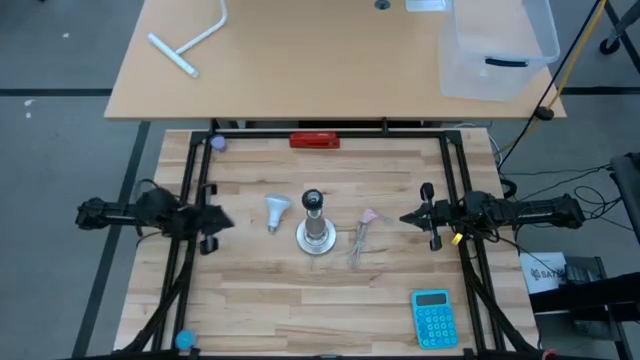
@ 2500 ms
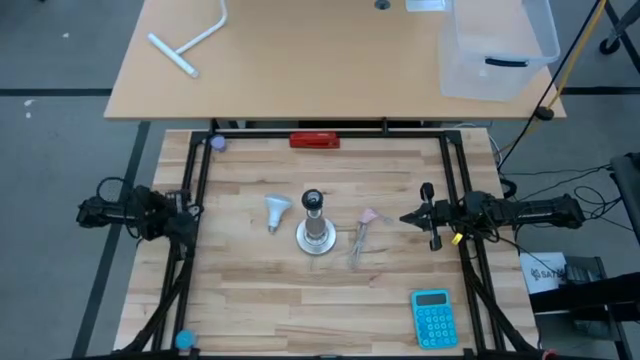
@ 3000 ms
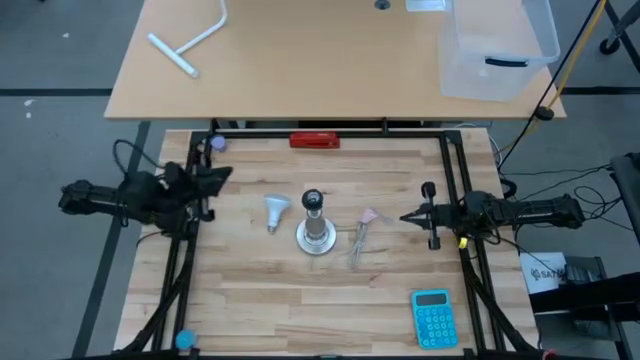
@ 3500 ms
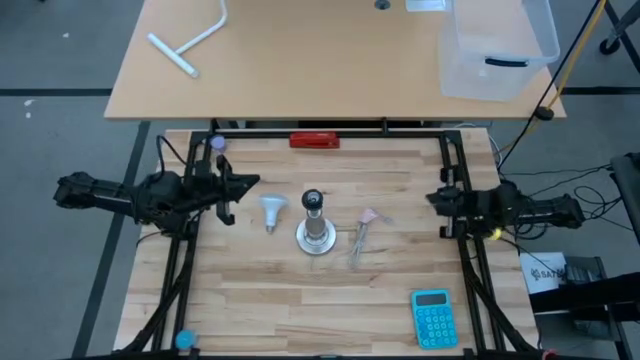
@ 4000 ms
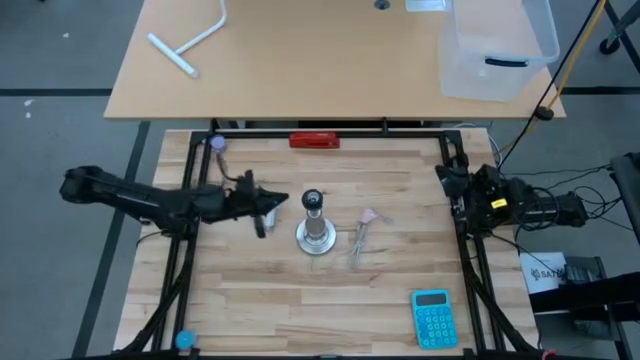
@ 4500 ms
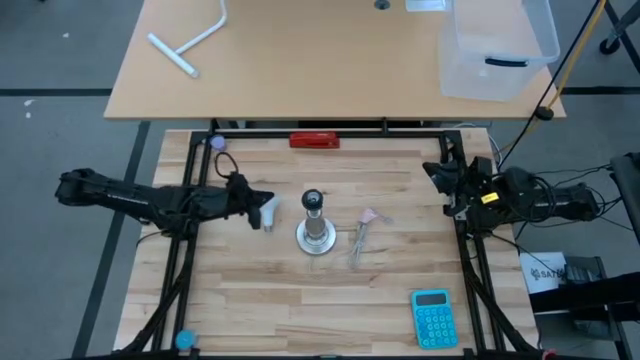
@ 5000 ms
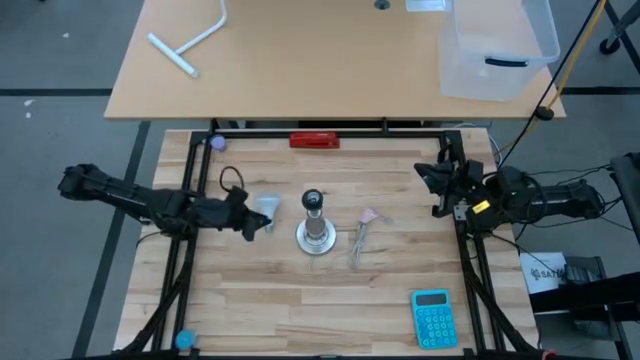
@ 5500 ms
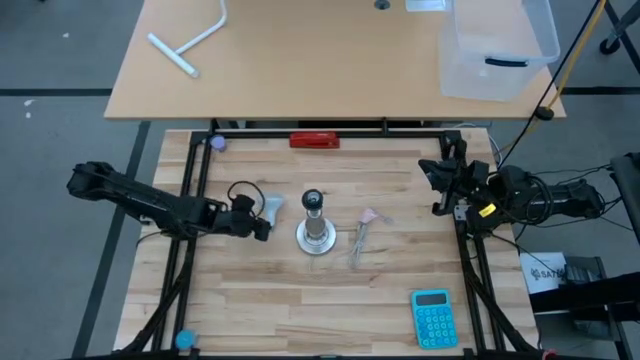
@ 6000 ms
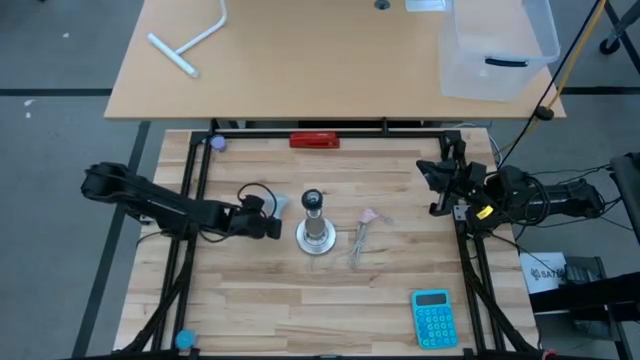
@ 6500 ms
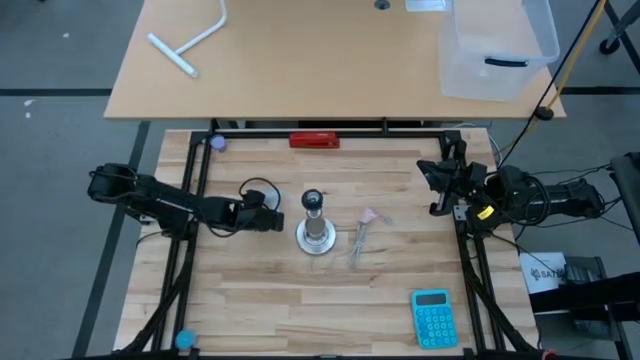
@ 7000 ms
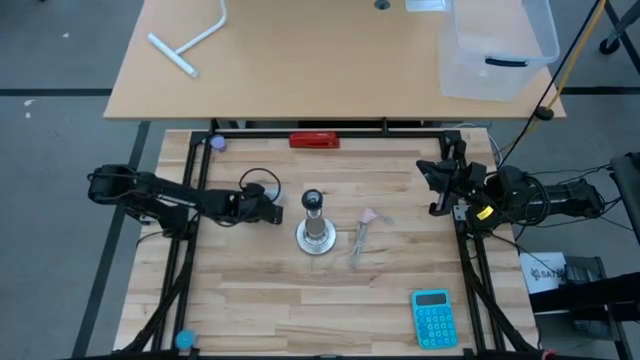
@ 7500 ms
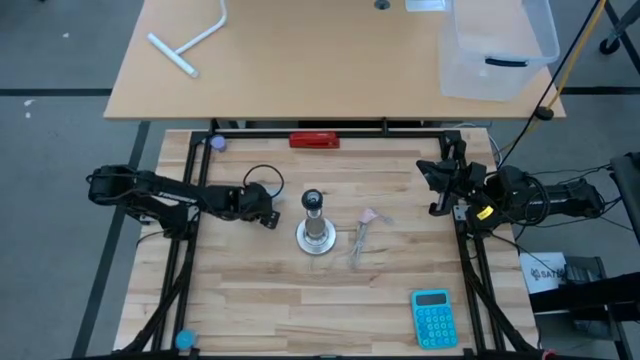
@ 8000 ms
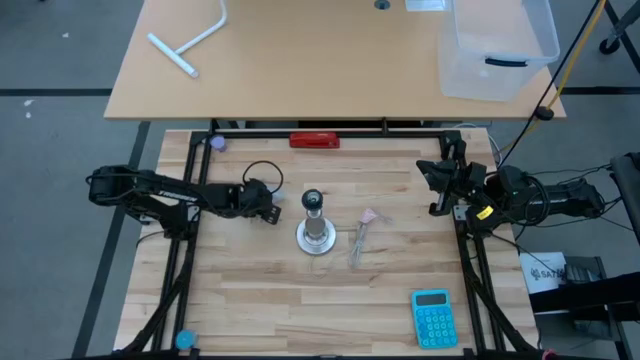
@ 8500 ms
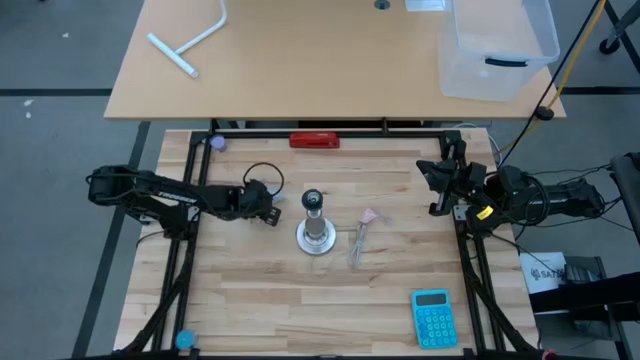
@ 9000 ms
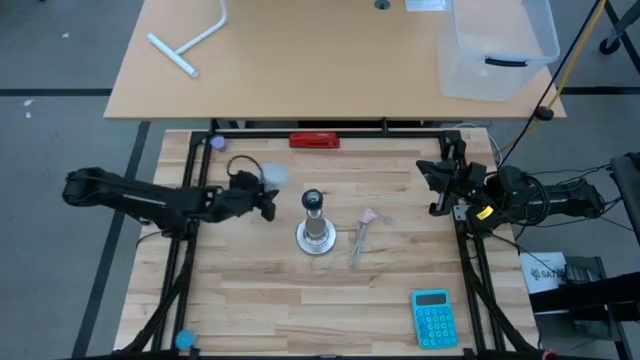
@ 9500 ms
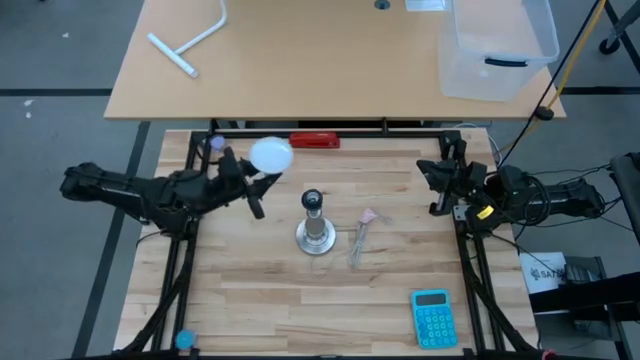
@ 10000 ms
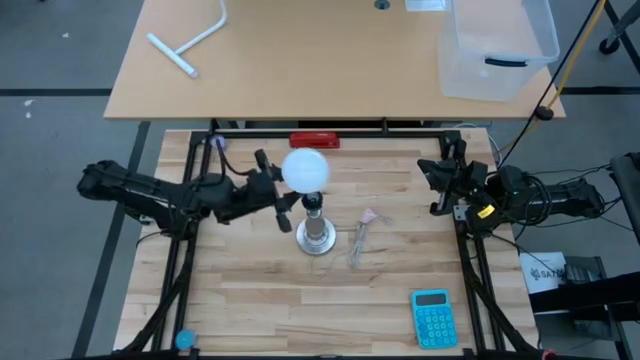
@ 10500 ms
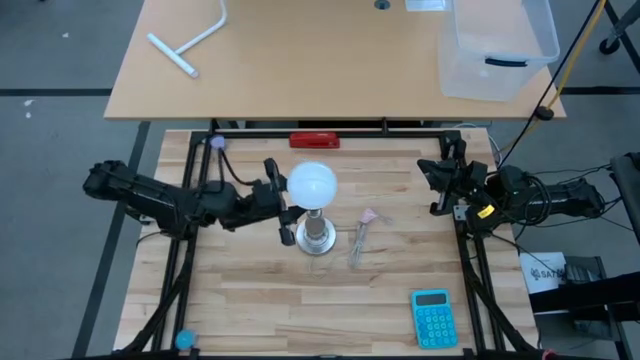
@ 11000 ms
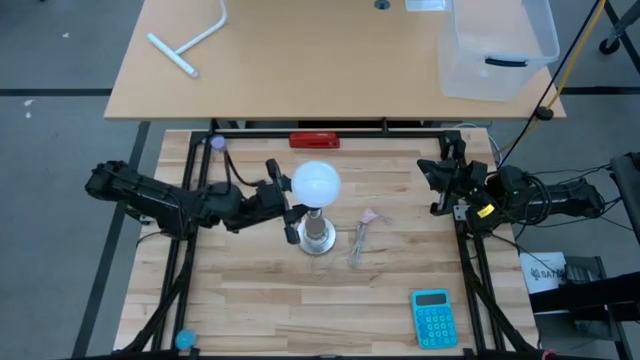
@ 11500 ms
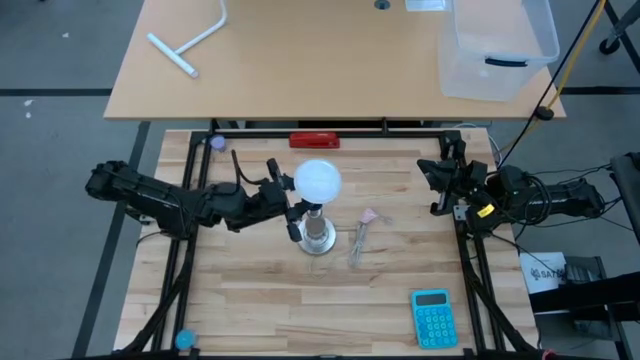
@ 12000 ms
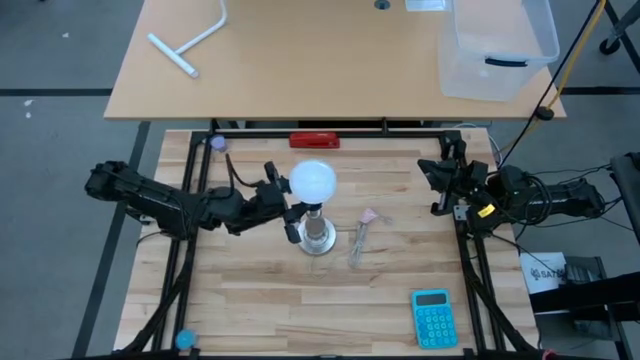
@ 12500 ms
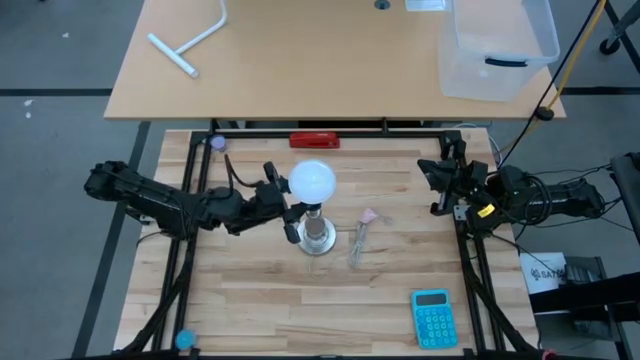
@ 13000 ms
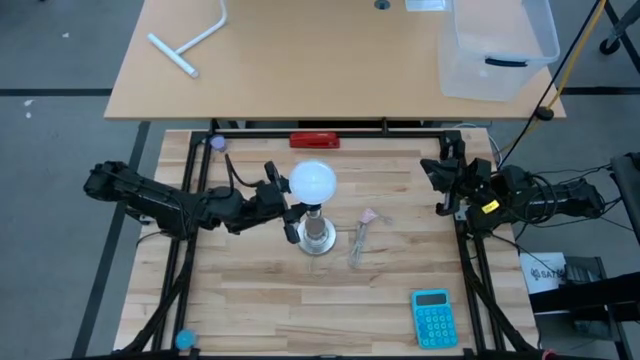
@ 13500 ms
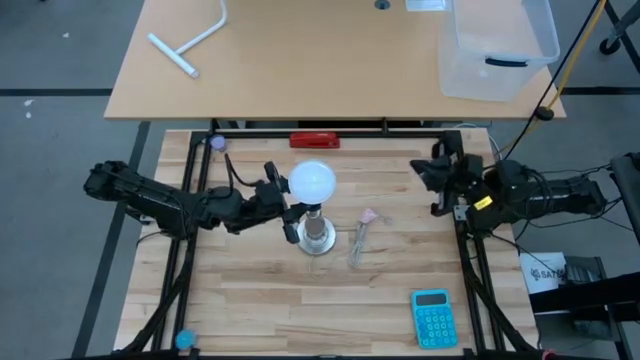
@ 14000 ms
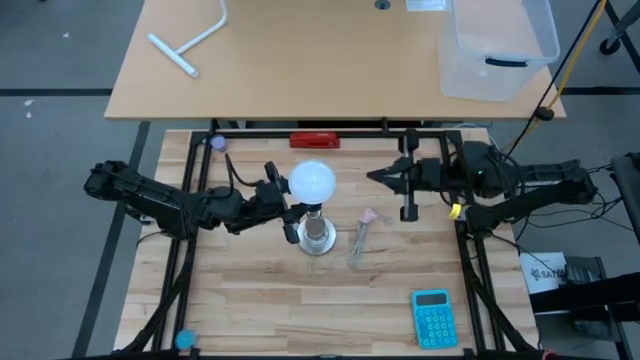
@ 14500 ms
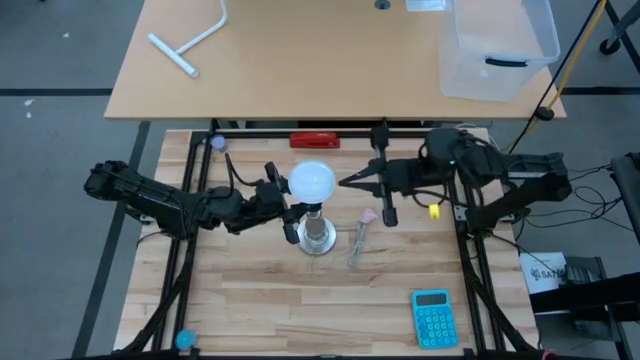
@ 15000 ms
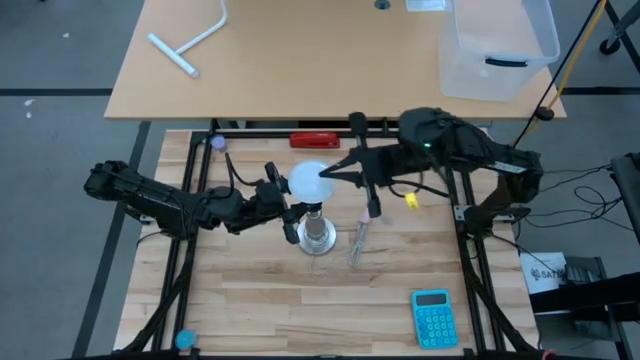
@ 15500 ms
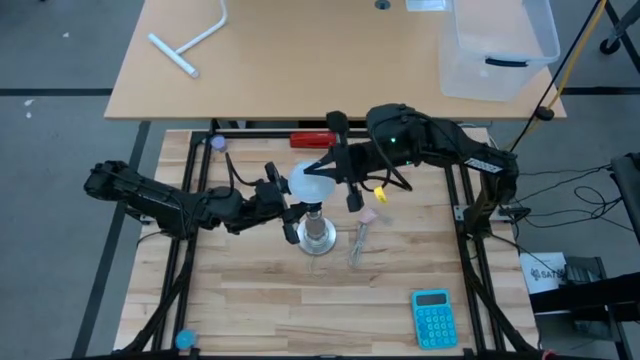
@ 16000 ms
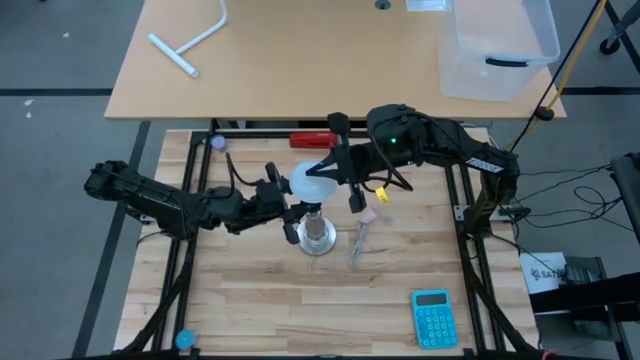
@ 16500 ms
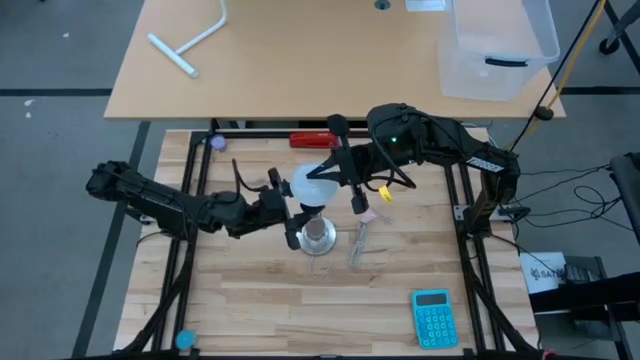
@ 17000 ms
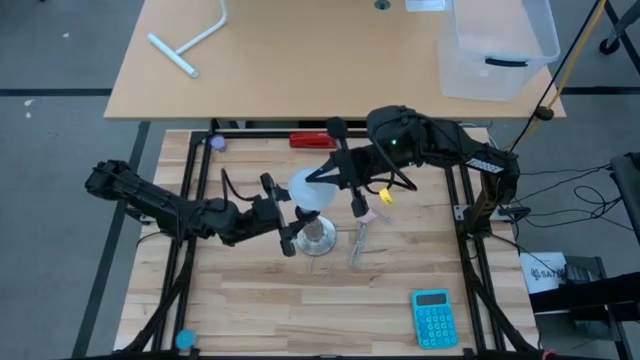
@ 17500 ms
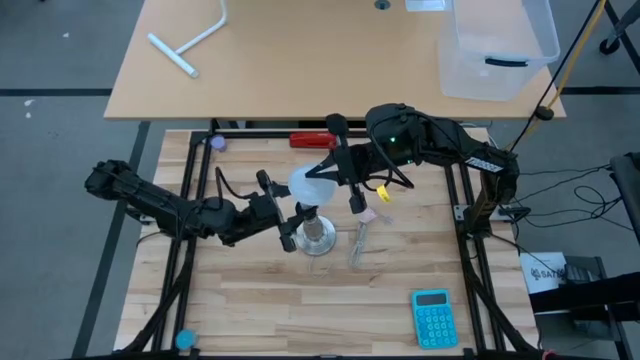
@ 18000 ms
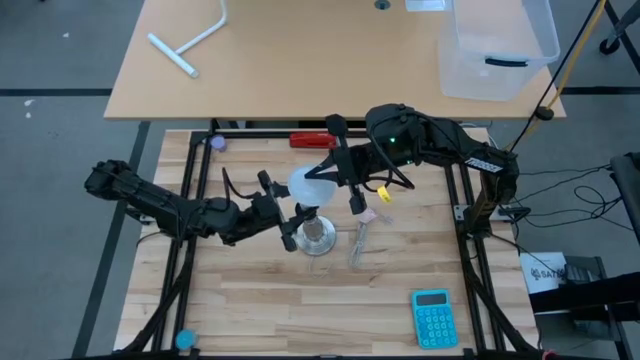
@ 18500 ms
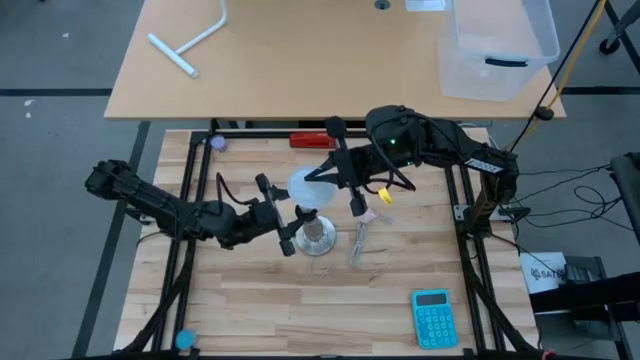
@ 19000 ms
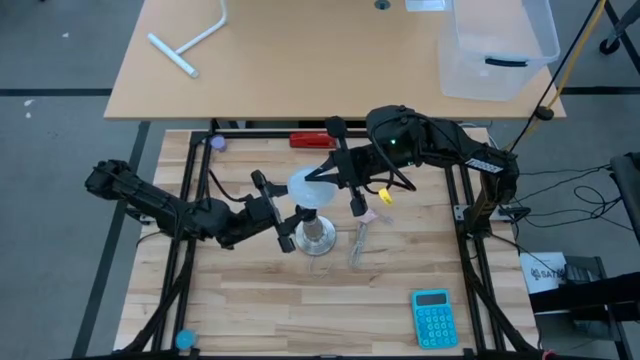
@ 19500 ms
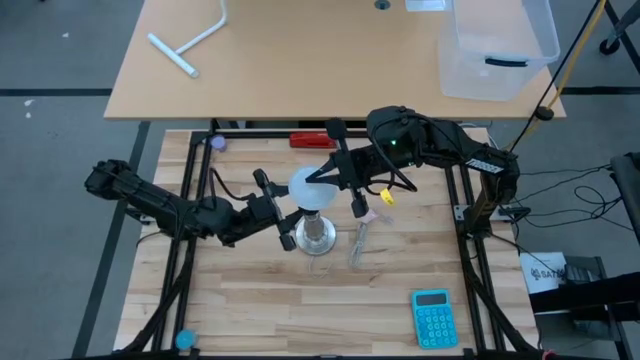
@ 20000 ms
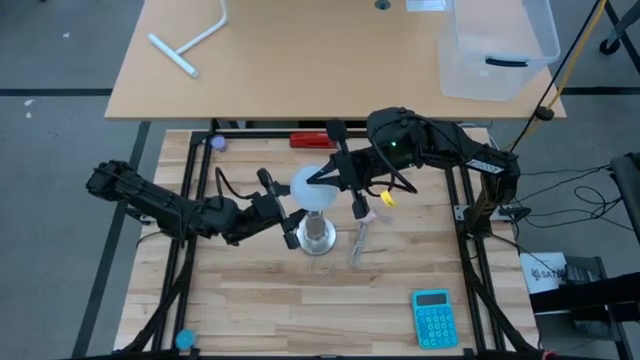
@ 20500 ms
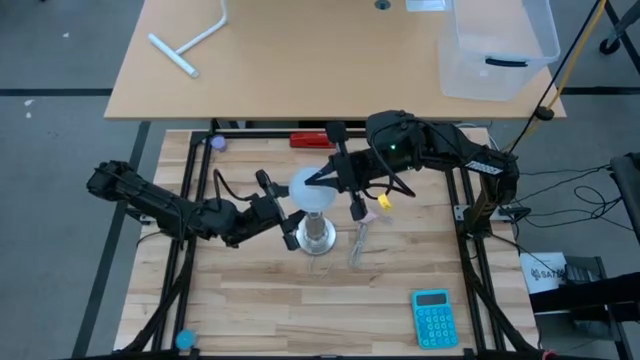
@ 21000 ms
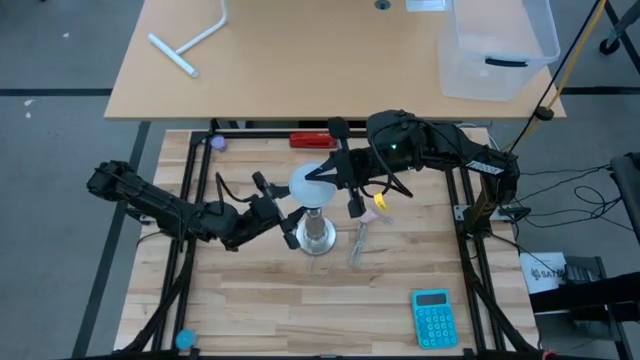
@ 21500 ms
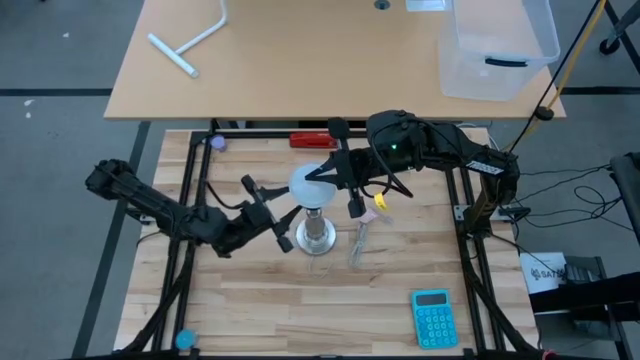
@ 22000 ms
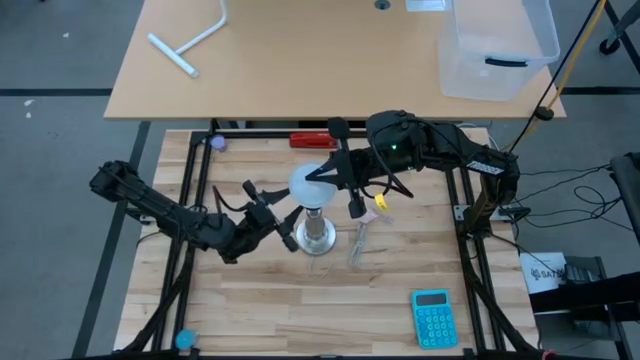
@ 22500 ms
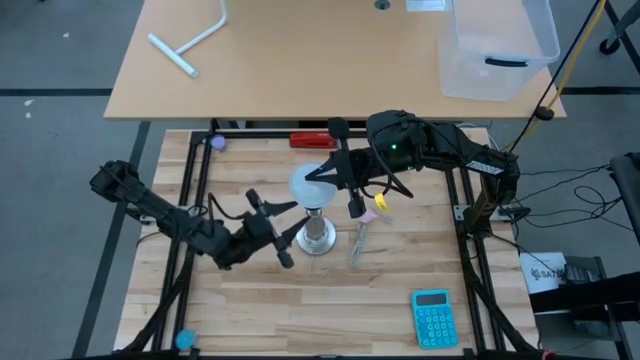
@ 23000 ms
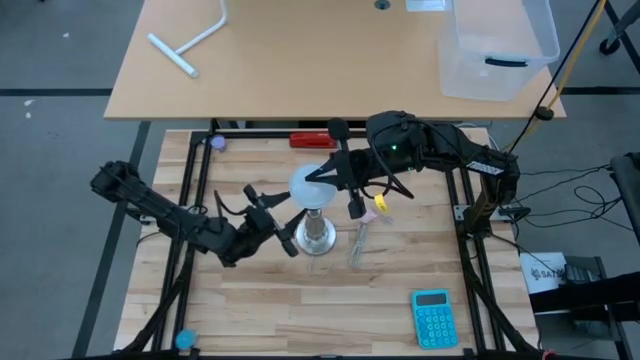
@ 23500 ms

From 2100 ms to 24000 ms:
Task: Screw lightbulb
Insert the white lightbulb into the silver lamp

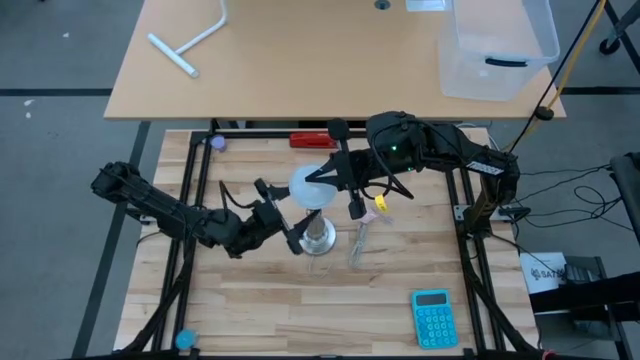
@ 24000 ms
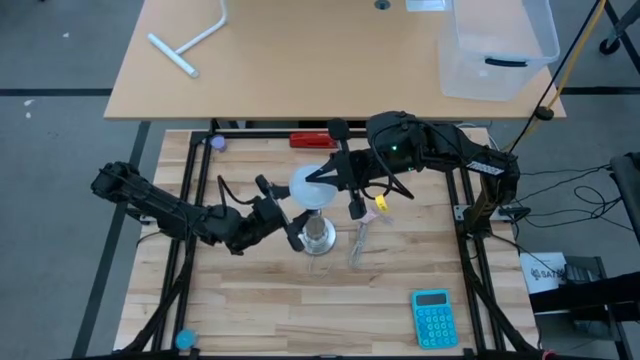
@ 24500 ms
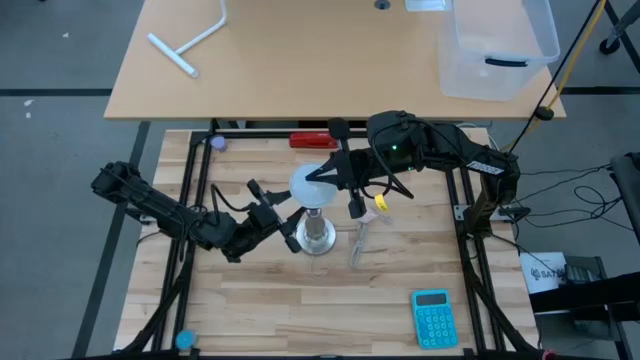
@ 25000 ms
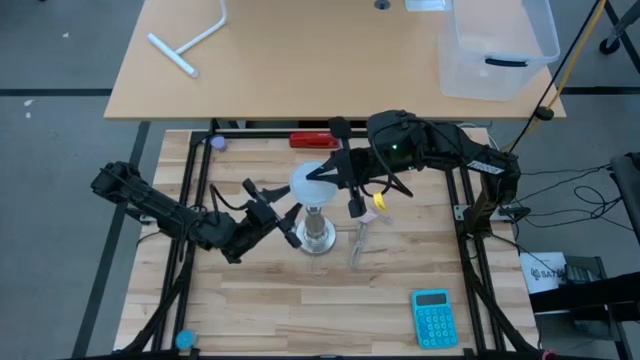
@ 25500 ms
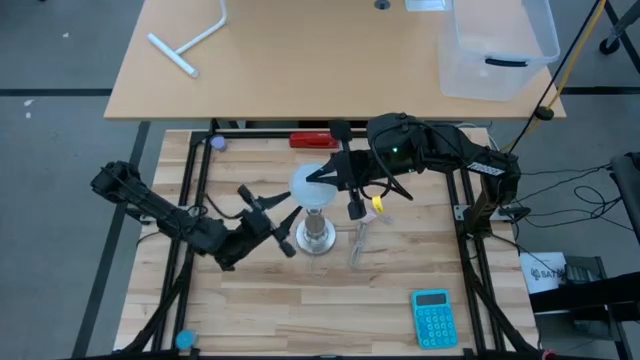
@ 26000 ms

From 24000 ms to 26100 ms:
Insert the white lightbulb into the silver lamp
